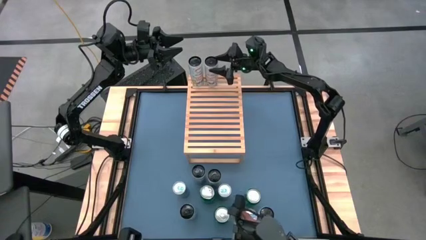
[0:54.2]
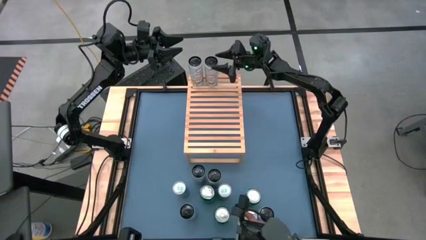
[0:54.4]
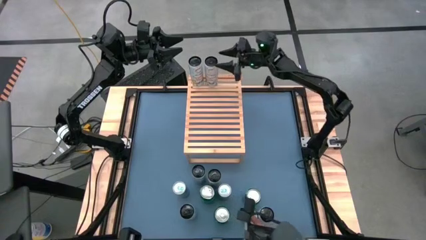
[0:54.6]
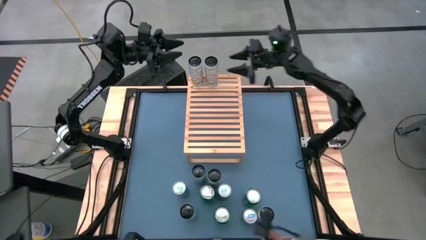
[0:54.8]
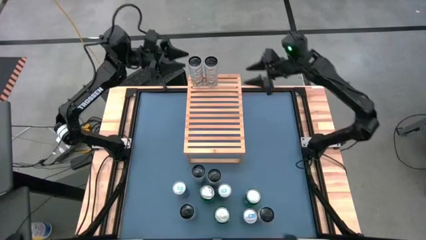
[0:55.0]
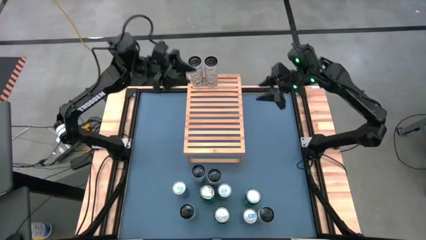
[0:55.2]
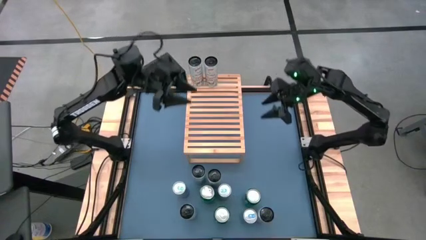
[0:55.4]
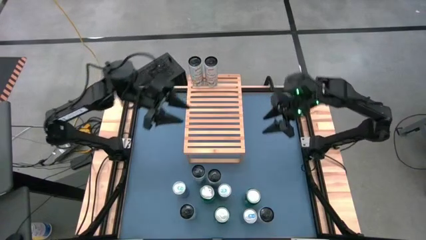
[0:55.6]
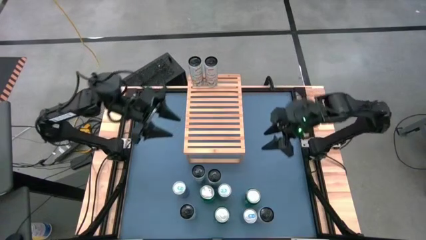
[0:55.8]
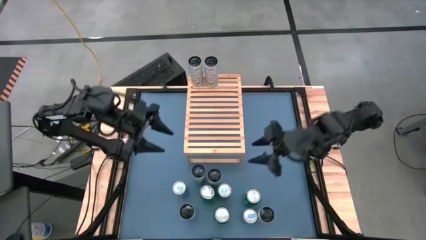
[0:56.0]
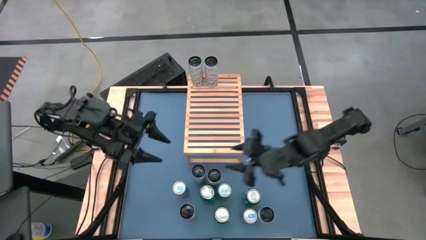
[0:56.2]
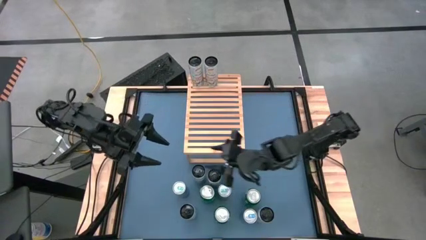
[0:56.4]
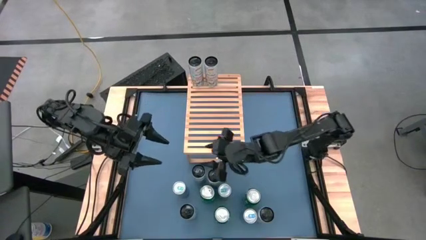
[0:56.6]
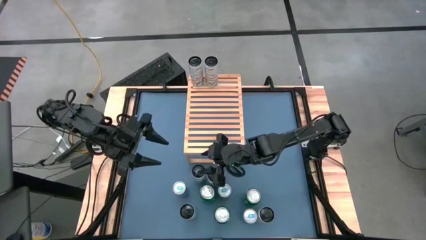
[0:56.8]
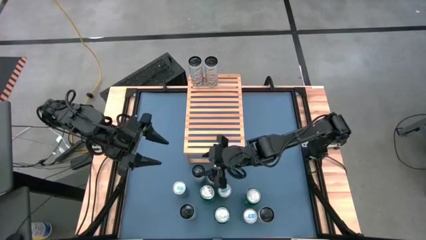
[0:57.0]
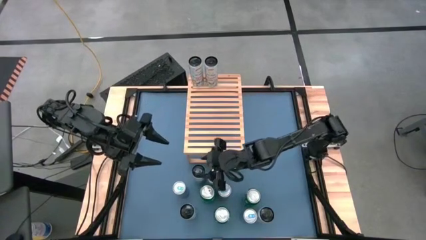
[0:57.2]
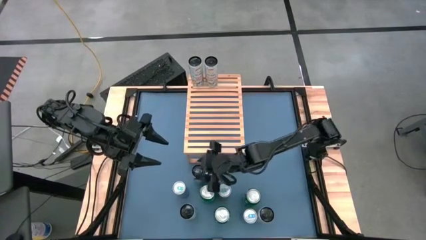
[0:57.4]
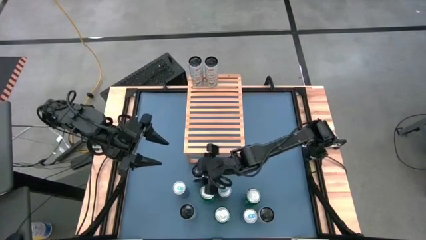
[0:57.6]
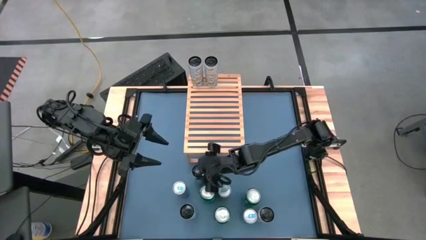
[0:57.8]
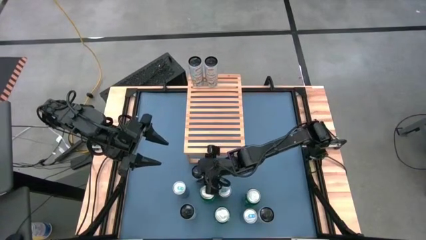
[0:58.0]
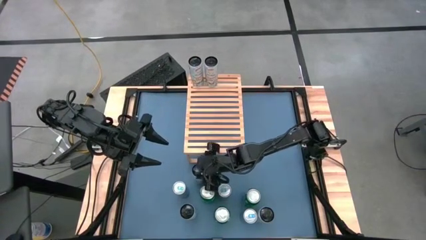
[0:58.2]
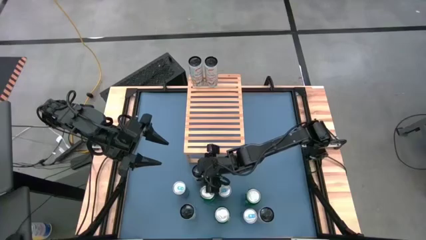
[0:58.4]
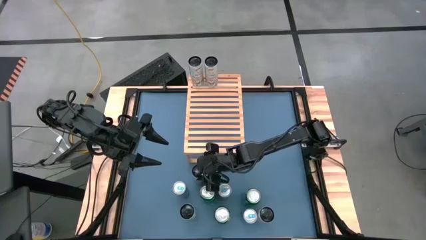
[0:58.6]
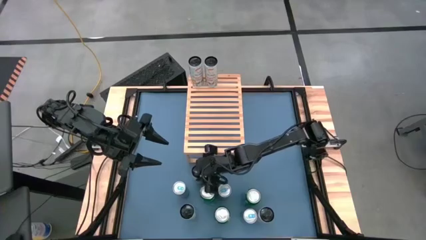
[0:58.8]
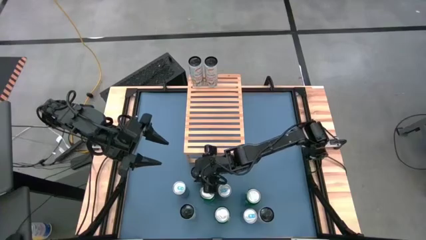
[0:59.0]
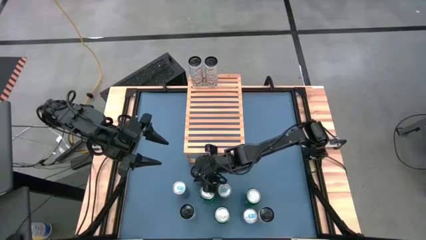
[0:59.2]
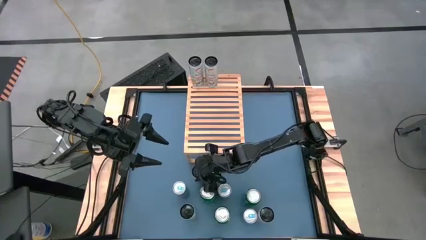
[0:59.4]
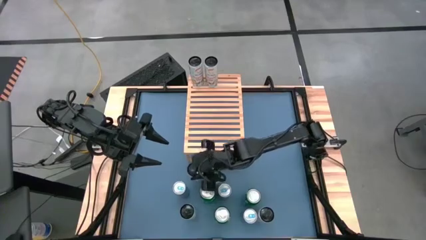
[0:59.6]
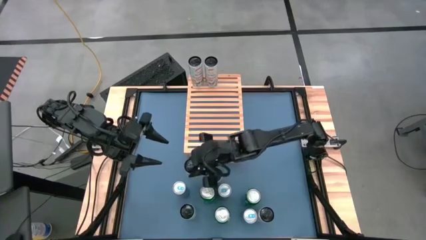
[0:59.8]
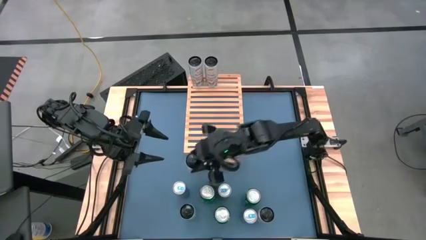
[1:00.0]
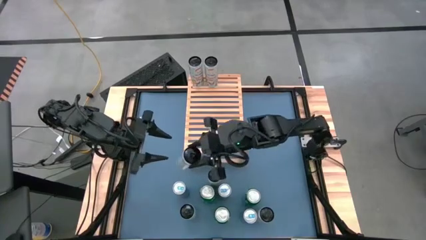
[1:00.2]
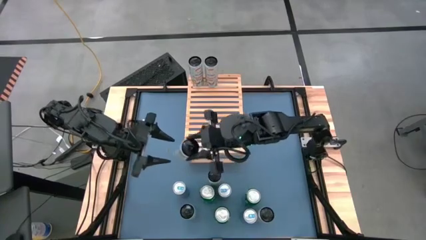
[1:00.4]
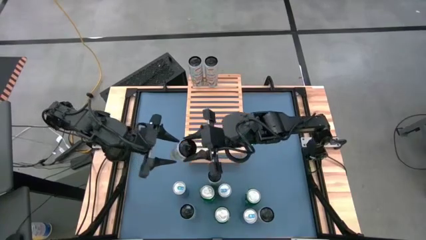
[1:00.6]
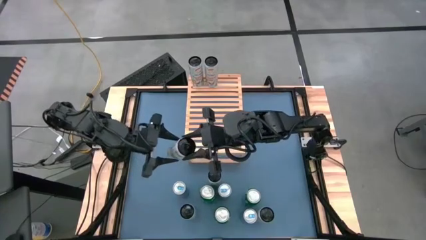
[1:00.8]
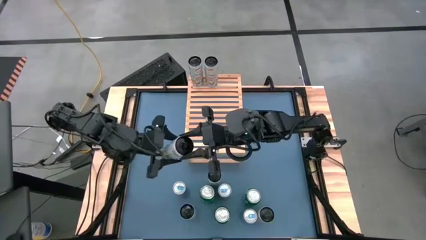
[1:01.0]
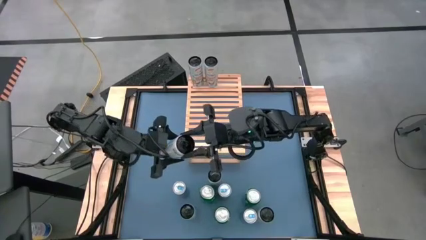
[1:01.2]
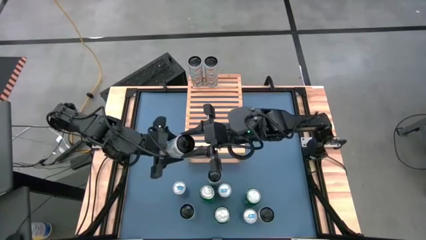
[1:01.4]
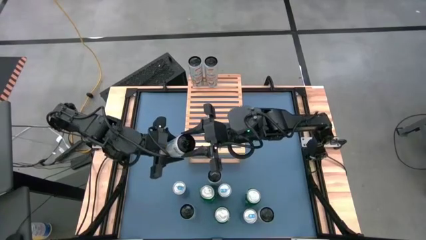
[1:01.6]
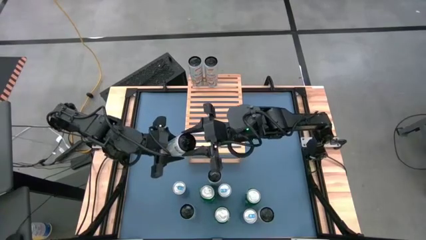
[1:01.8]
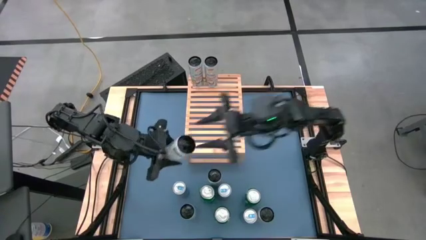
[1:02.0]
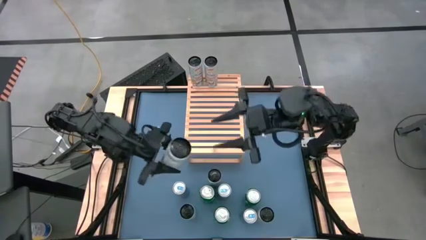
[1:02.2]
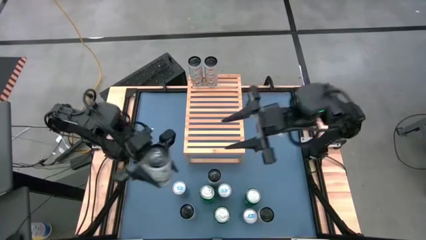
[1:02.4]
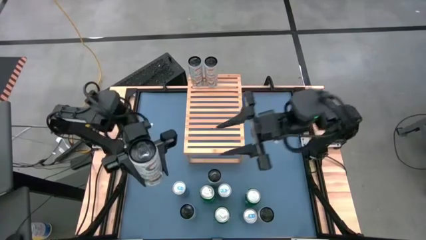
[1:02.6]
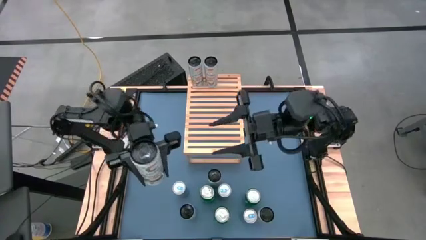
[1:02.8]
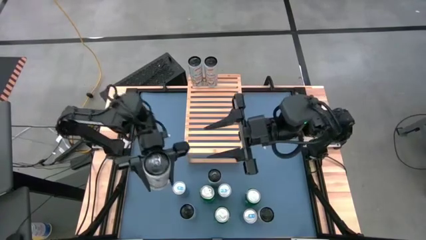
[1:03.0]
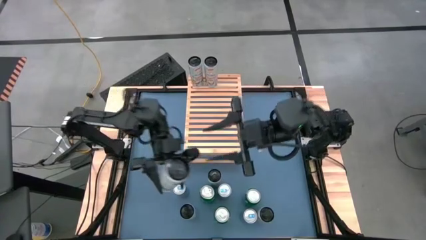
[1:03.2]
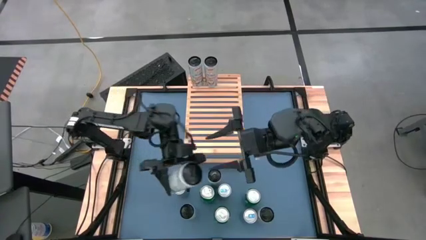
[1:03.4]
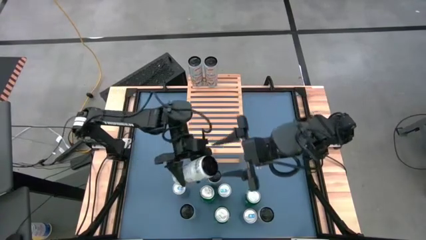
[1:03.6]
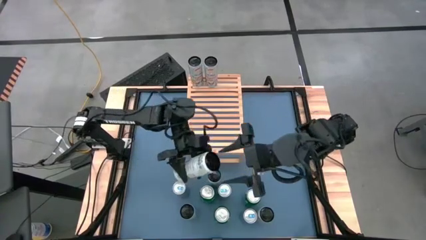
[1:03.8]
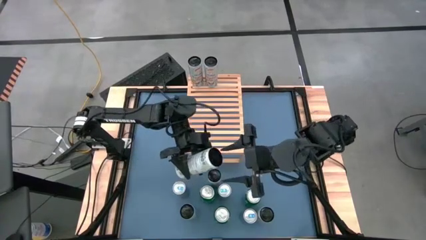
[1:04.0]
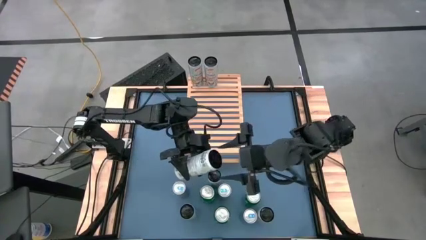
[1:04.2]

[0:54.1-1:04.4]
Task: Place canned beverage on shelf
Put the white yellow soda can on the shelf aligned with the other white yellow soda can
